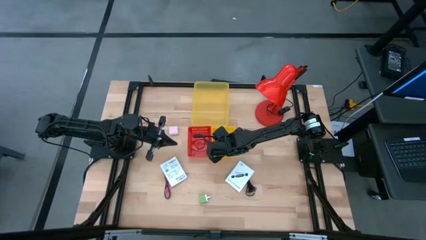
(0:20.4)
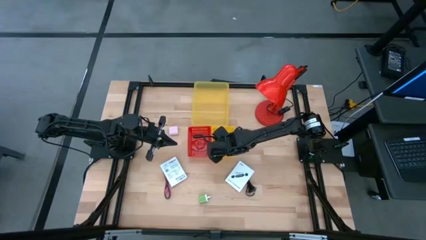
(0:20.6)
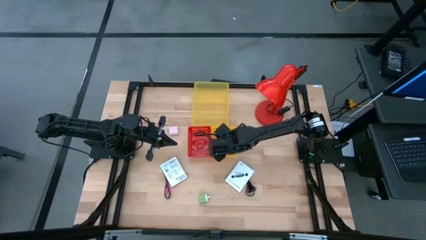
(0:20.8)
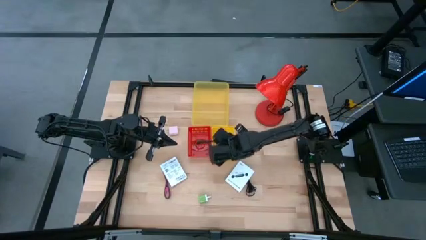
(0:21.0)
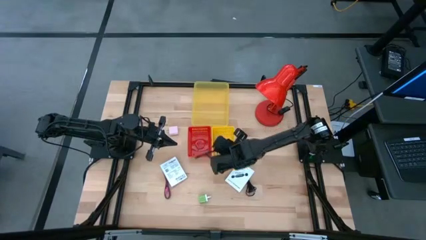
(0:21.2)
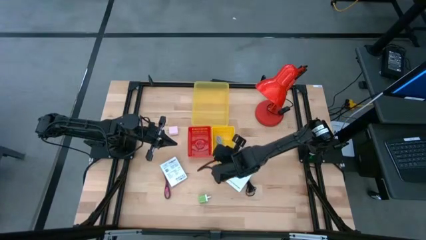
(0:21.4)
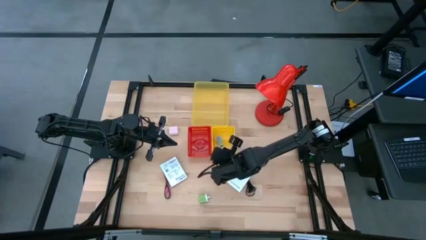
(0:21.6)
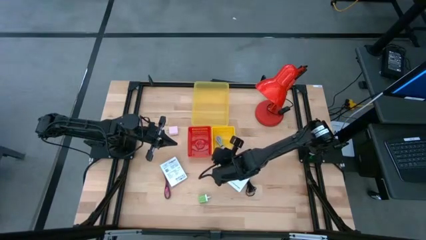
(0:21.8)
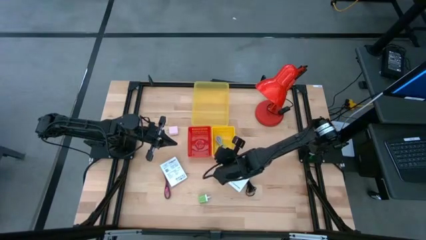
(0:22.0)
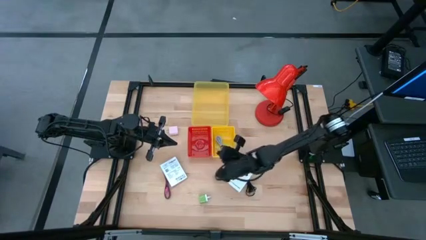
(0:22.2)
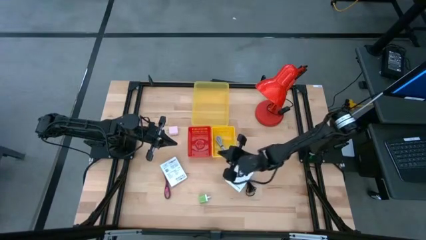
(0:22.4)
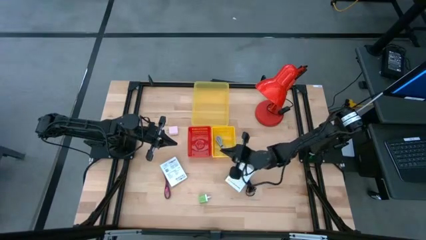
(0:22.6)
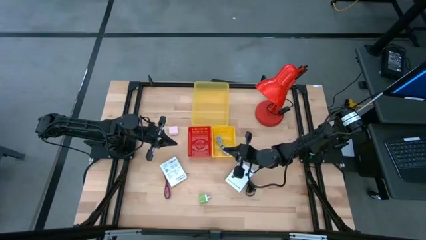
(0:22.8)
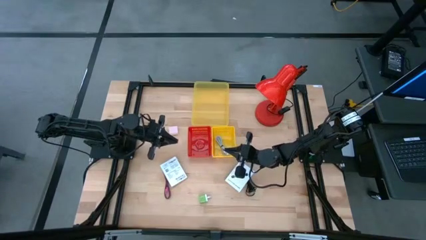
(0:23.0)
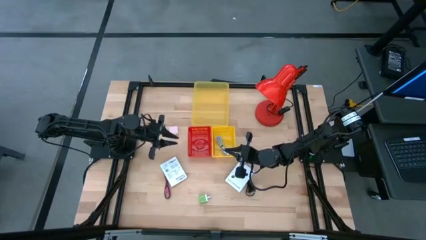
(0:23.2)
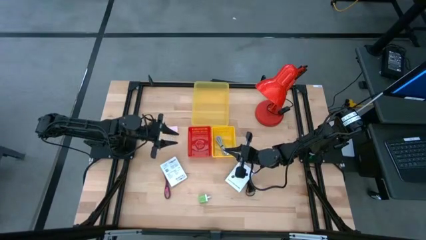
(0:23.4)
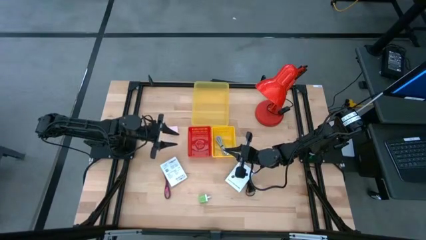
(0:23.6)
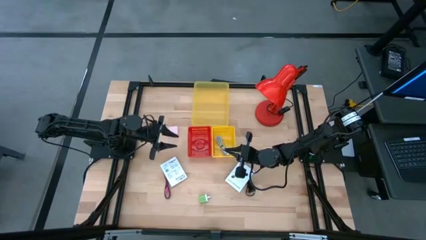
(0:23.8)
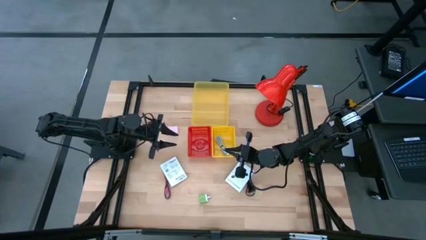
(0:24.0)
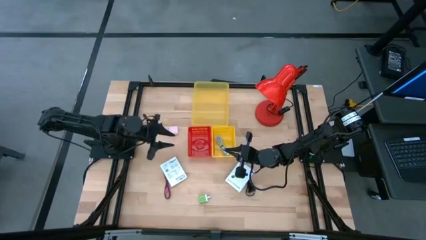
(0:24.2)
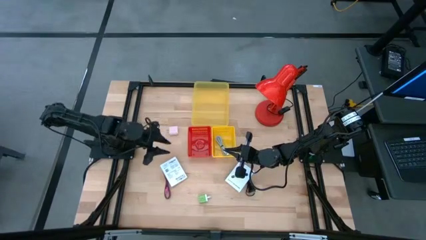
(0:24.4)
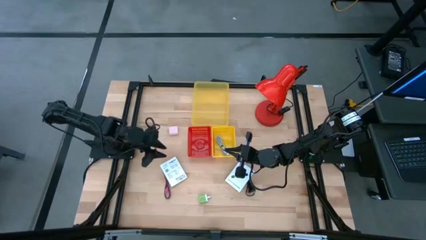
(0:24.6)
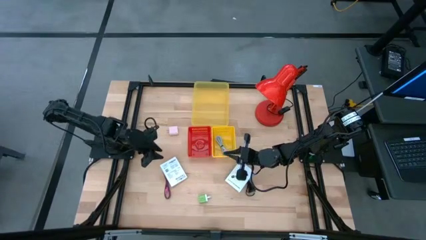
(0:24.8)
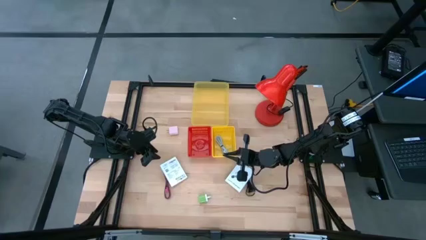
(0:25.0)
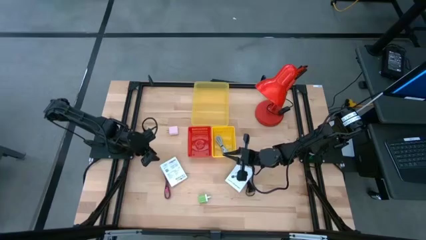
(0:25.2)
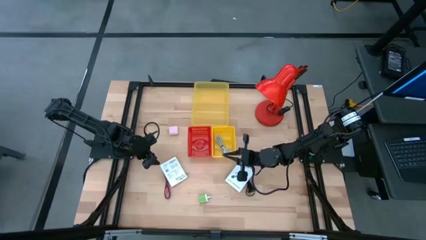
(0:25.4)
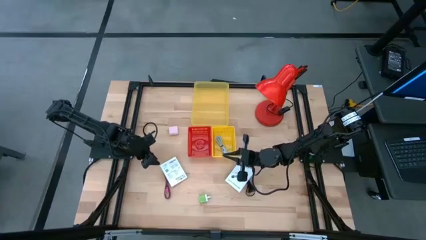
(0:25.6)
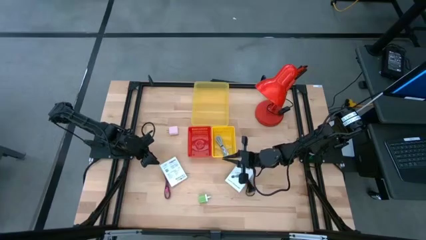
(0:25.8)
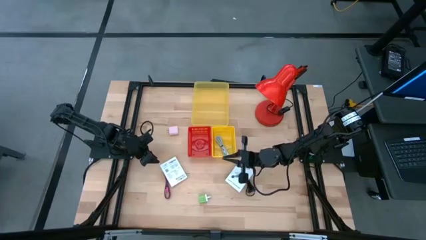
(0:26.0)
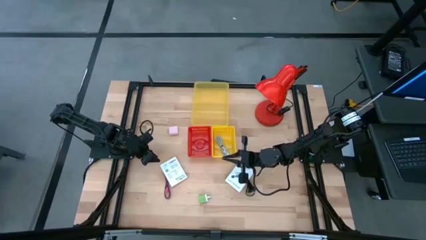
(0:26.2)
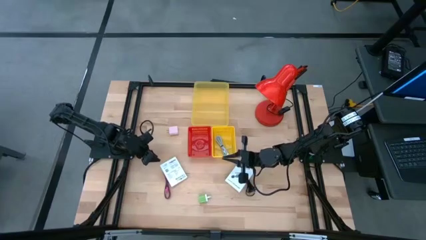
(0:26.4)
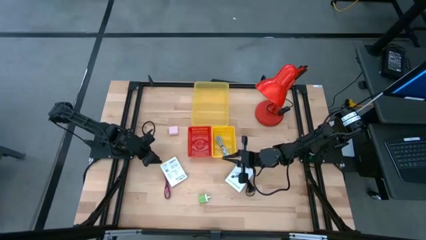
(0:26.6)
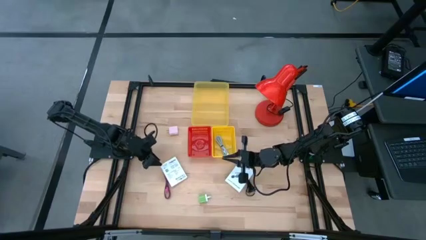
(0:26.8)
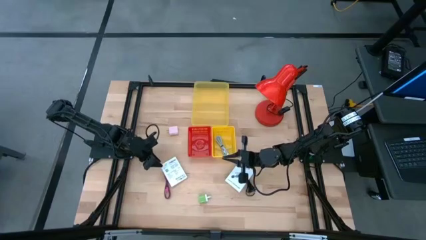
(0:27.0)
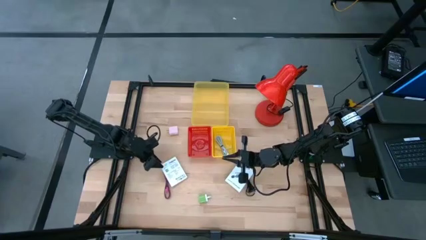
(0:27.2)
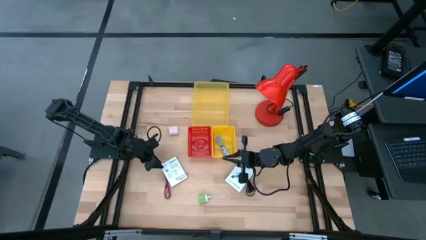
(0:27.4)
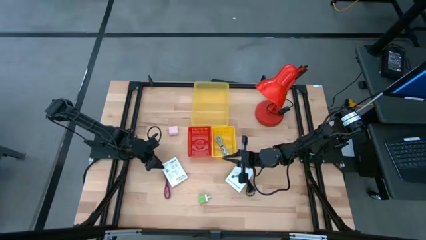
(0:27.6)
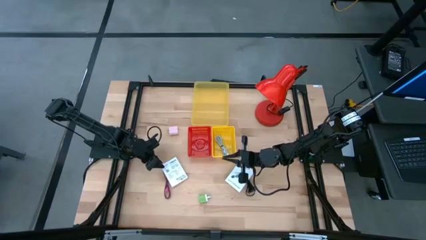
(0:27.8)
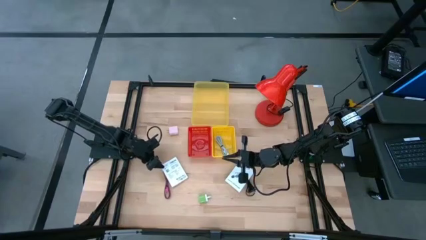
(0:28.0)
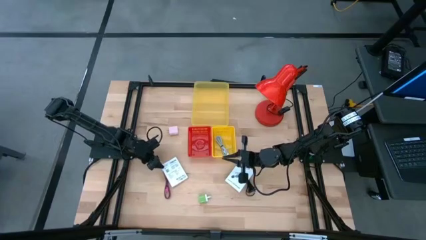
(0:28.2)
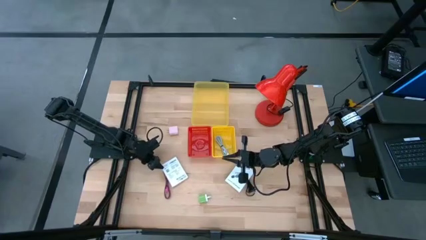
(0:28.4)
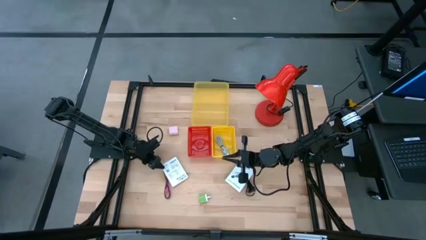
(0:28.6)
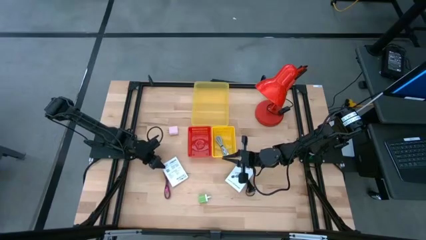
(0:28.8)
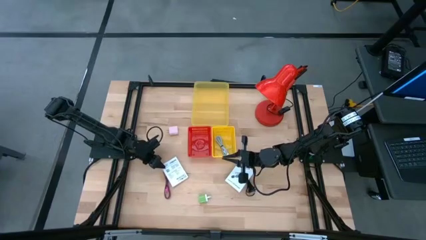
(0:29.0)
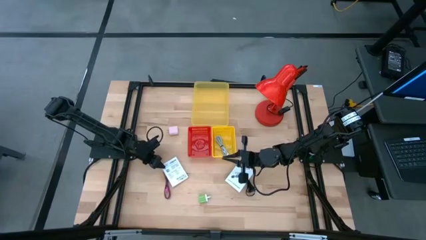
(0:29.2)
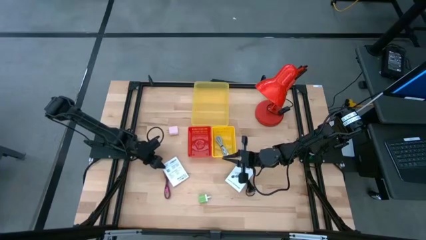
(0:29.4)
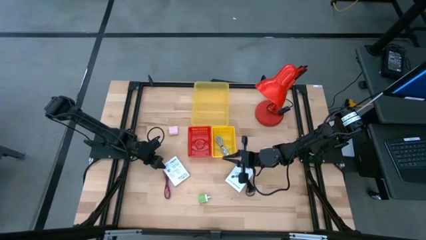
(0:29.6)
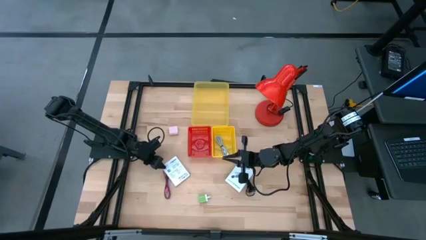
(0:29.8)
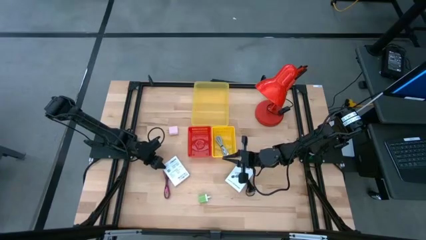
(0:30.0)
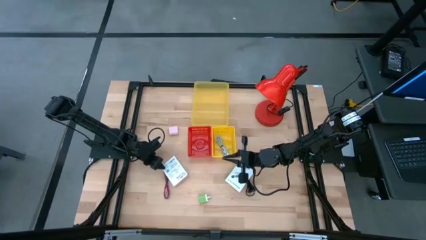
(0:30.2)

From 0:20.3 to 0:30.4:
Task: Pick and place items into bin
Put the left card reader box into the red bin

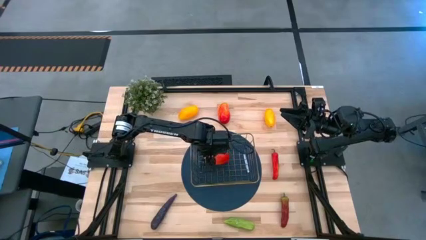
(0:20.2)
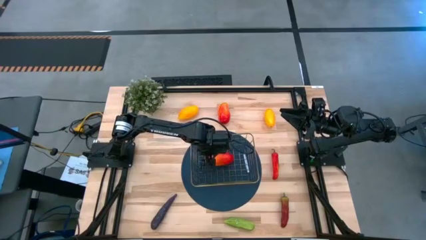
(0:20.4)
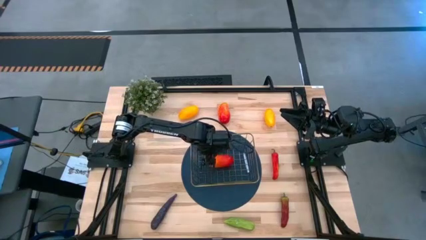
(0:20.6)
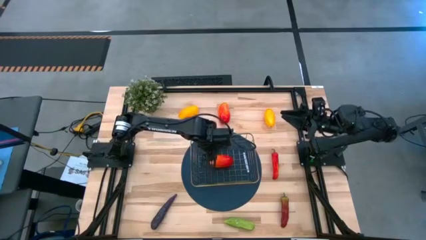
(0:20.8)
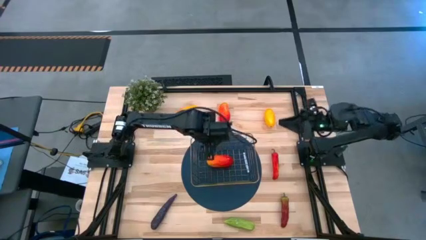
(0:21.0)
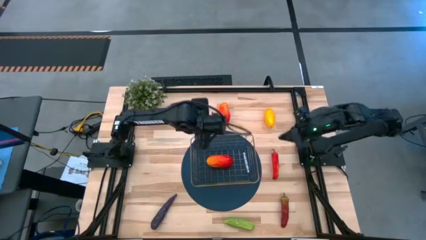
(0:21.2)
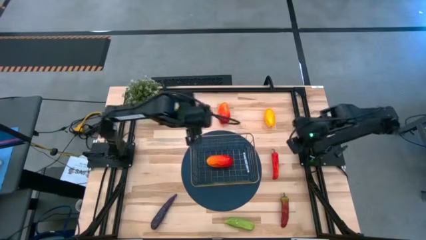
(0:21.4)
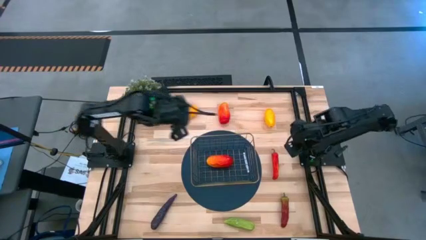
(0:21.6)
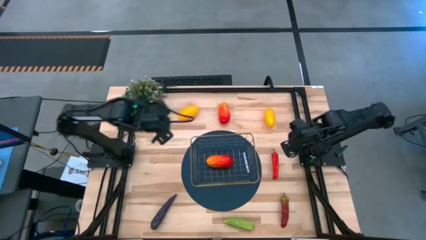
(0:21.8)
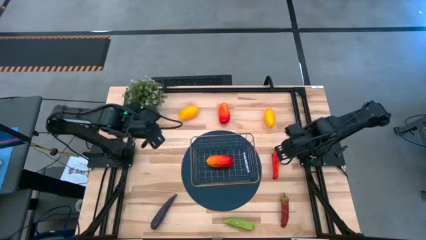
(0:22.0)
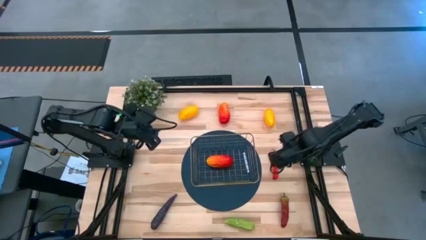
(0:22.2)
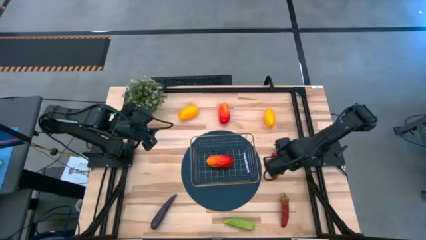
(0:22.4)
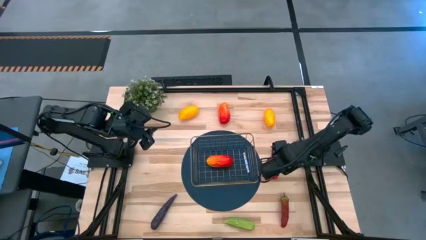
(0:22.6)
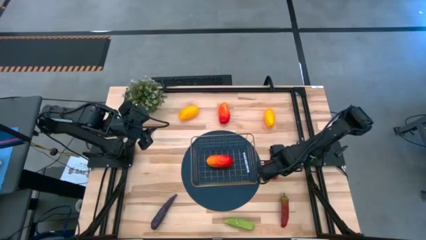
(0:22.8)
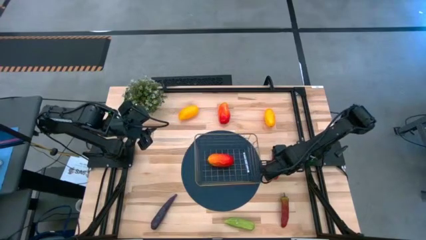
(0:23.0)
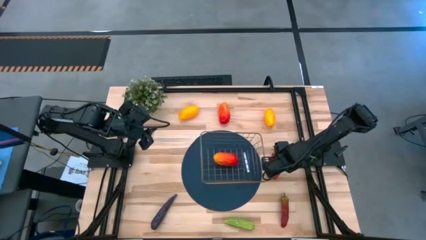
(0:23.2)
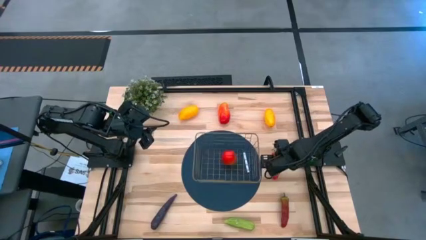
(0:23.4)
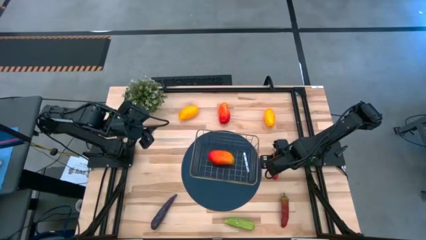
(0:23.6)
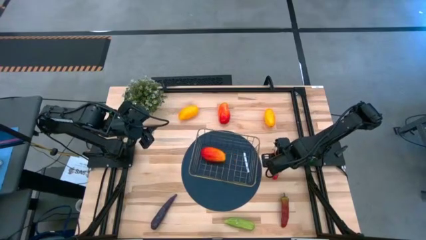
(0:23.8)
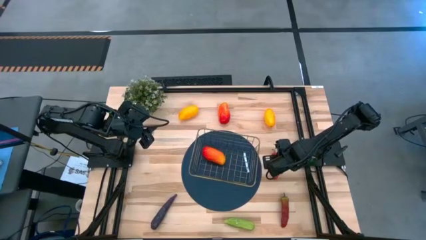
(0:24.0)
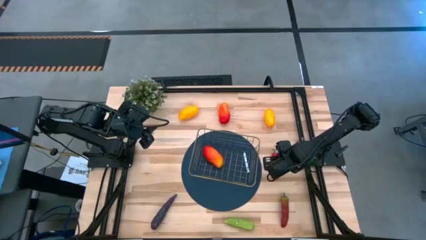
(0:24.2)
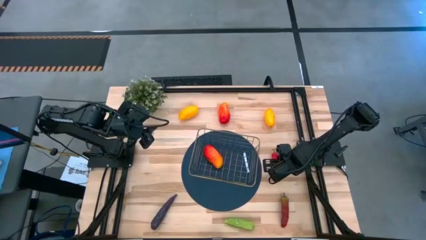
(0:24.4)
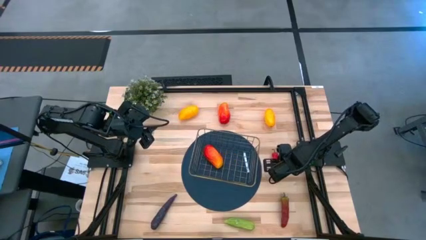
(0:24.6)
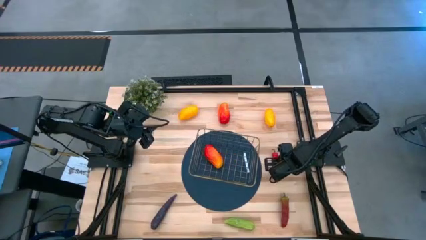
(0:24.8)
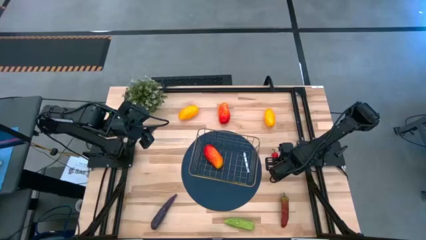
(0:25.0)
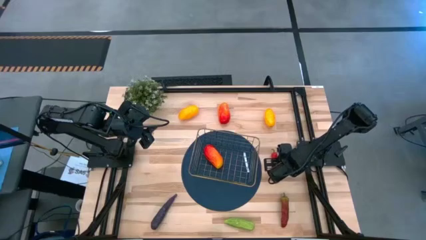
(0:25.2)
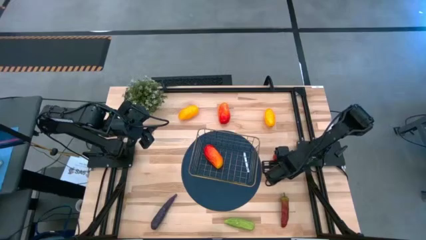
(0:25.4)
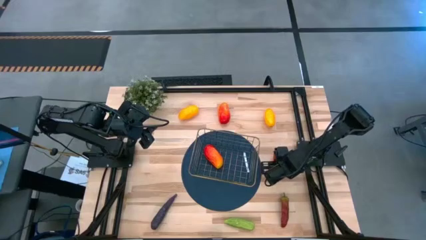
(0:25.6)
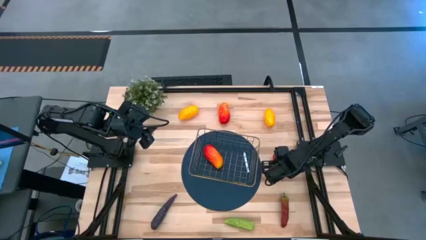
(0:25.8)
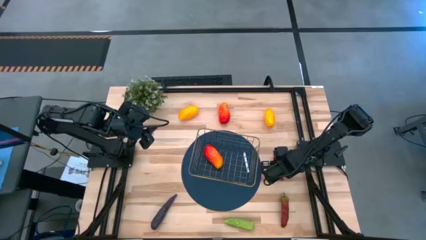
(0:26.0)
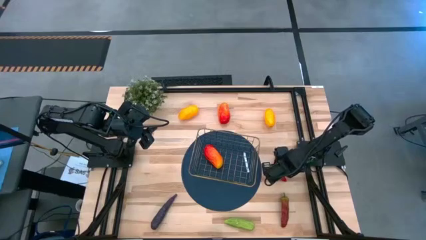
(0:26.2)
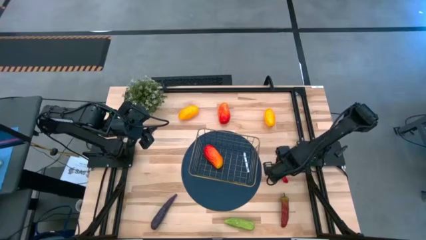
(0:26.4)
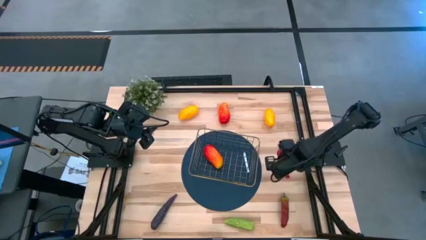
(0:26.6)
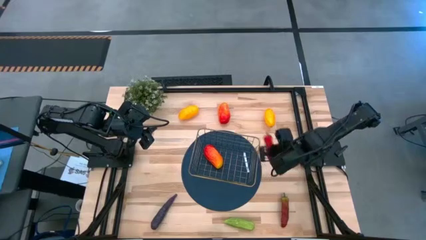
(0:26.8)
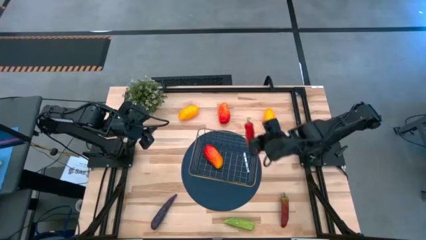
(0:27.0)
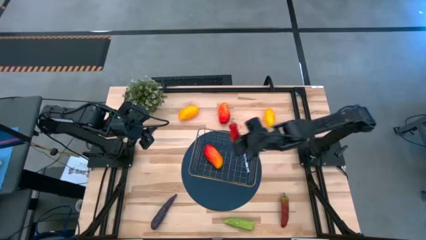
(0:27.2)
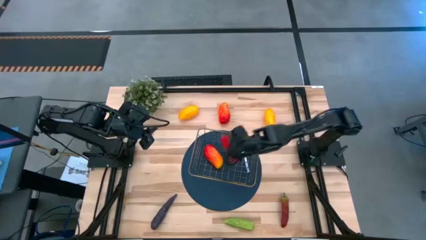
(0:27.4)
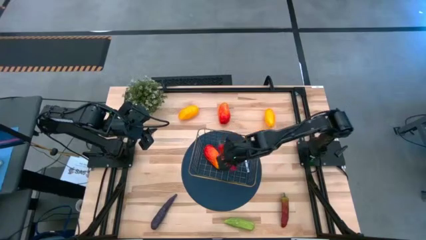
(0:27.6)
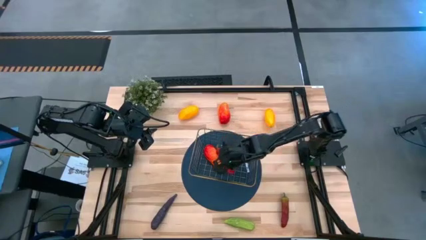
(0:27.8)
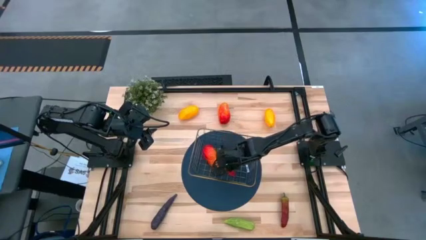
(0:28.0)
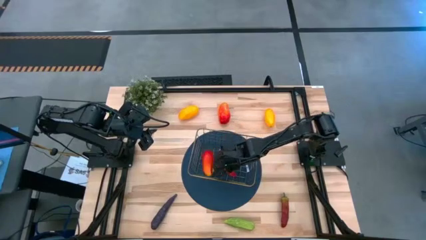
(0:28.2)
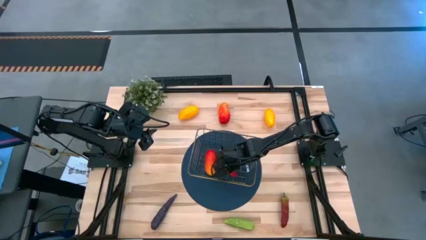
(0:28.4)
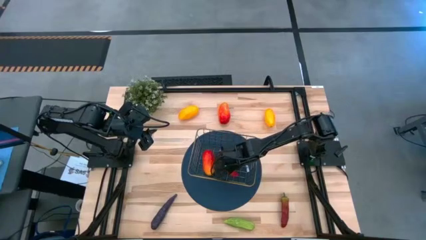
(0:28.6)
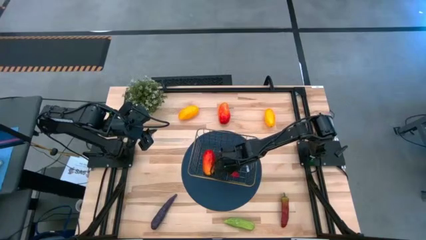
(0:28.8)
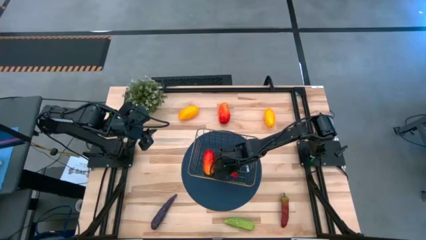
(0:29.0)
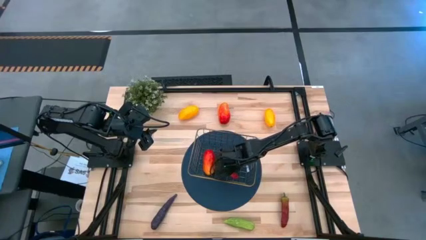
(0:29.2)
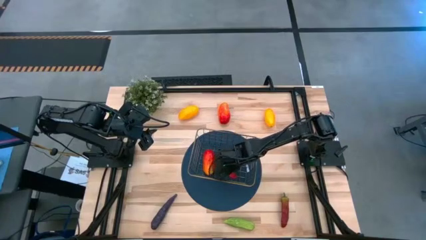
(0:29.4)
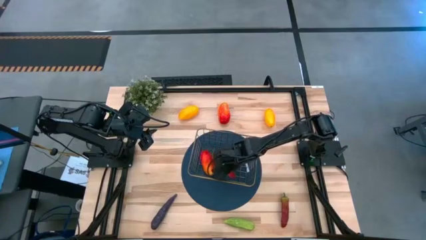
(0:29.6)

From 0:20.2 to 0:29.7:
Task: Build produce basket
Put the red chili pepper into the gold wire basket
